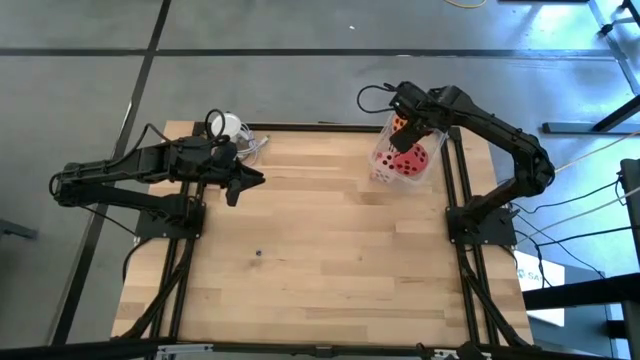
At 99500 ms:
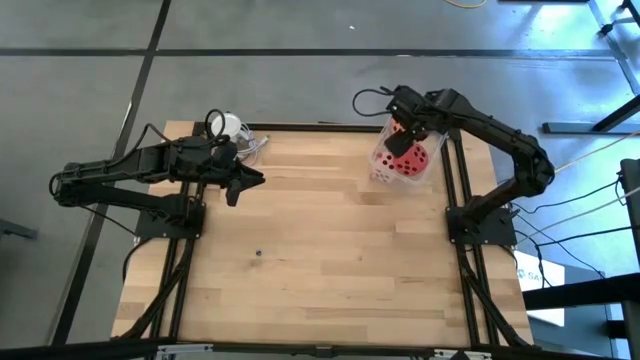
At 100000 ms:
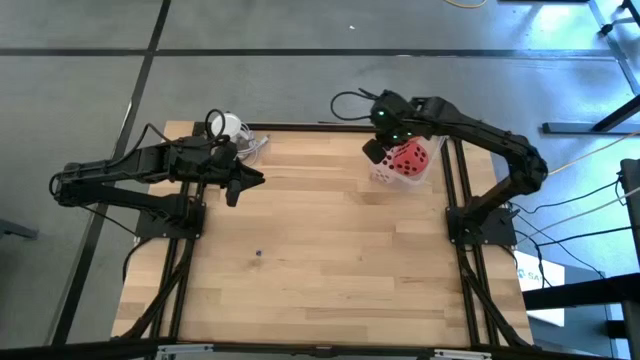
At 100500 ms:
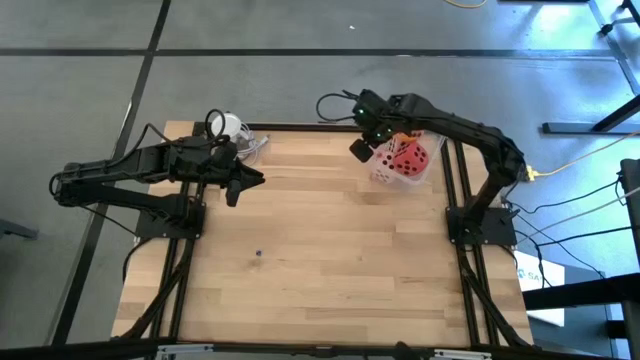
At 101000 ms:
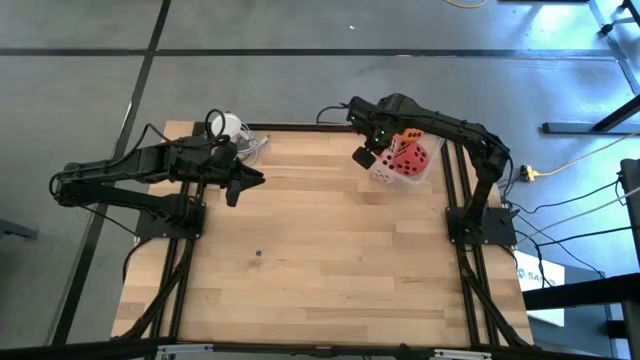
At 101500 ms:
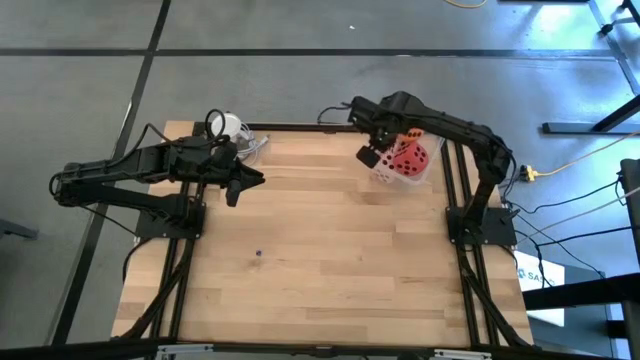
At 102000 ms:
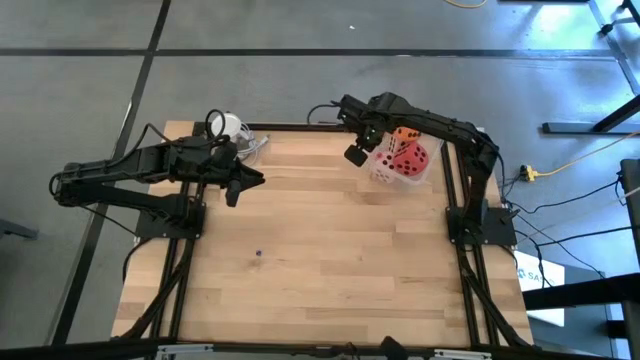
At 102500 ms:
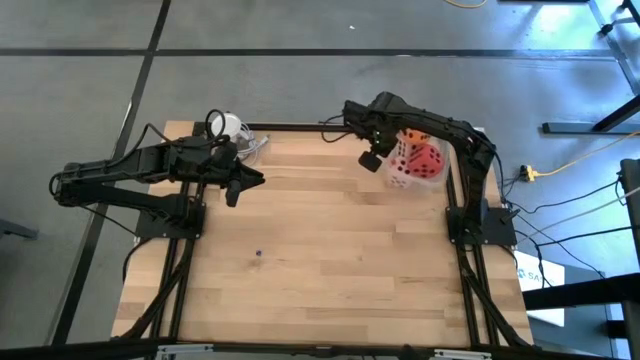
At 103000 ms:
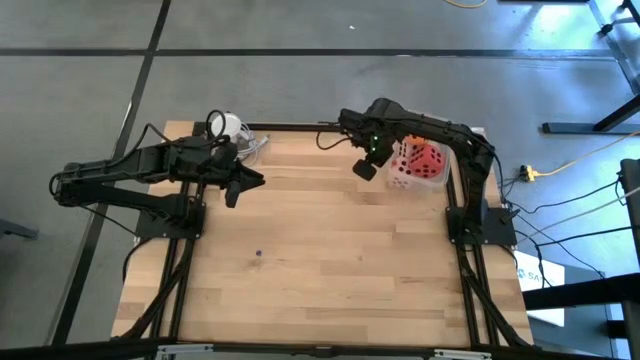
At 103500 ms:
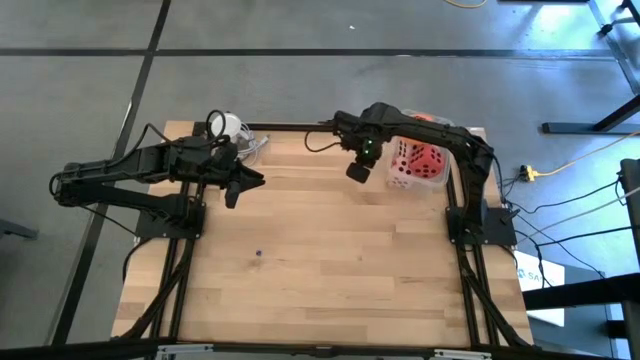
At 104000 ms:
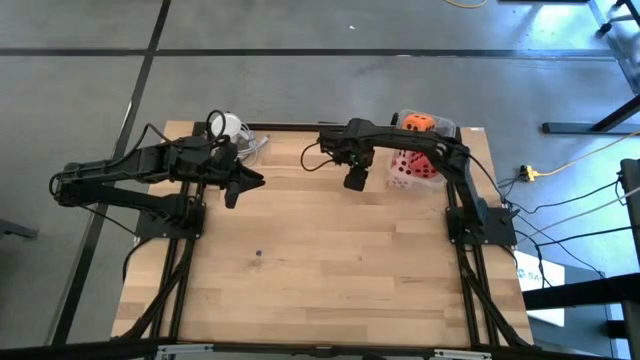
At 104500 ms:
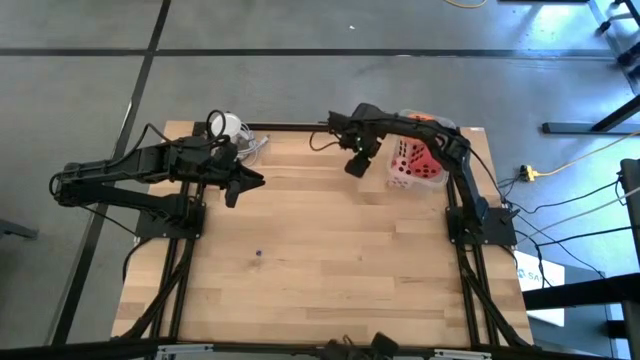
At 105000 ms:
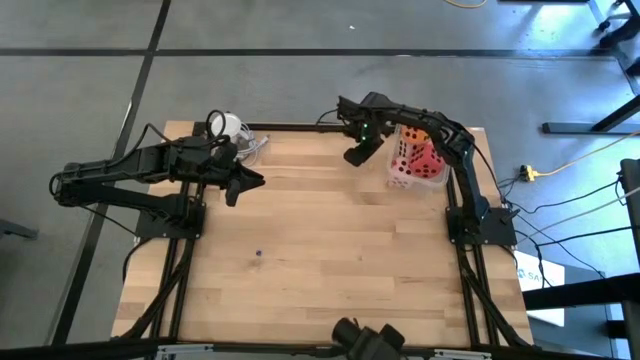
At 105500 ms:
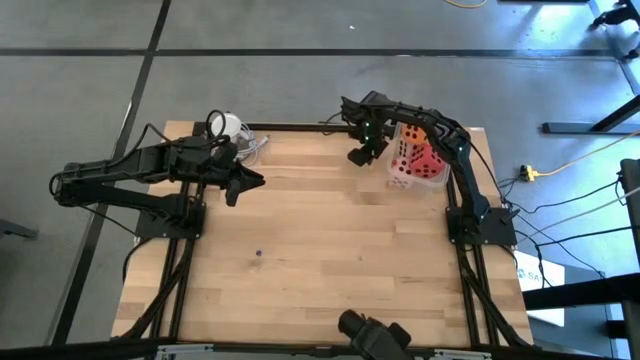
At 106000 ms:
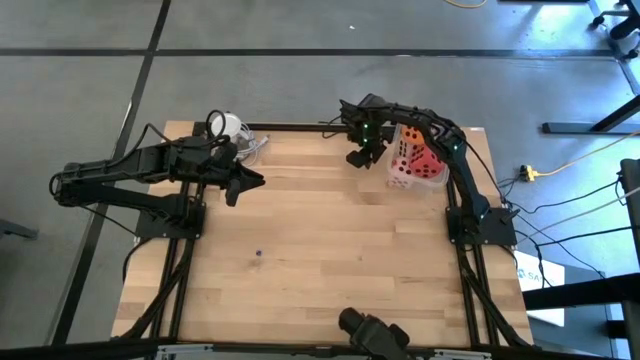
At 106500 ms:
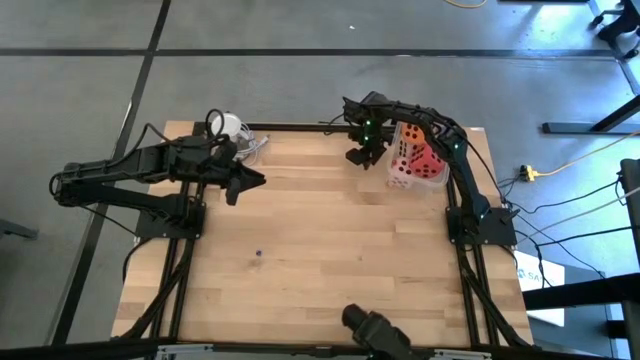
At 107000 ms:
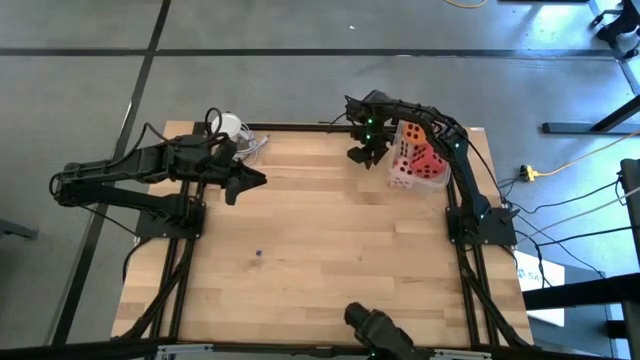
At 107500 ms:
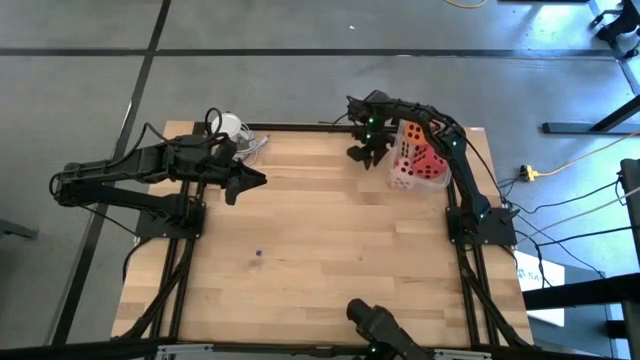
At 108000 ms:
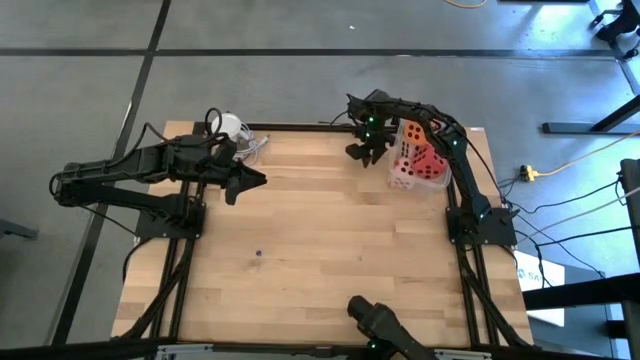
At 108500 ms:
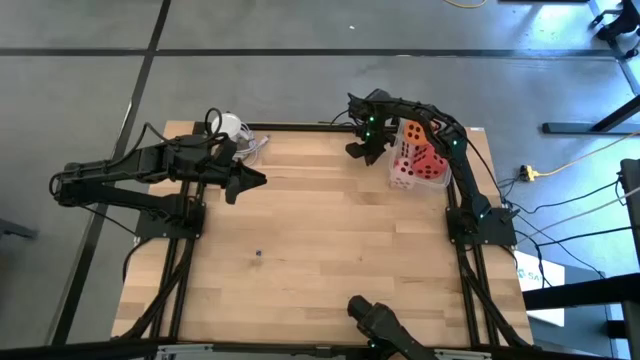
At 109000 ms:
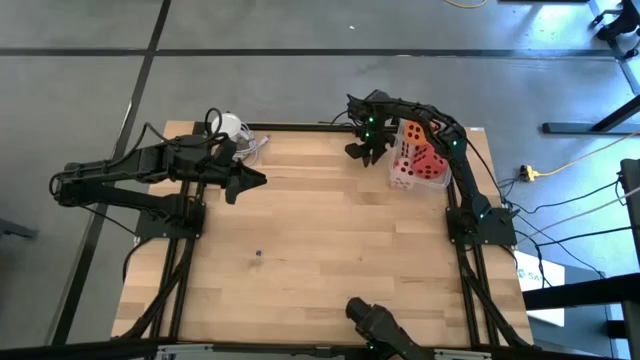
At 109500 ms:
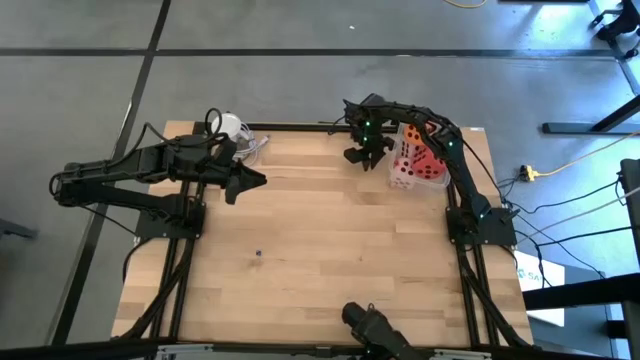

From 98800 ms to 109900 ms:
Task: Pick & Place Dice
Put the small yellow die into the container

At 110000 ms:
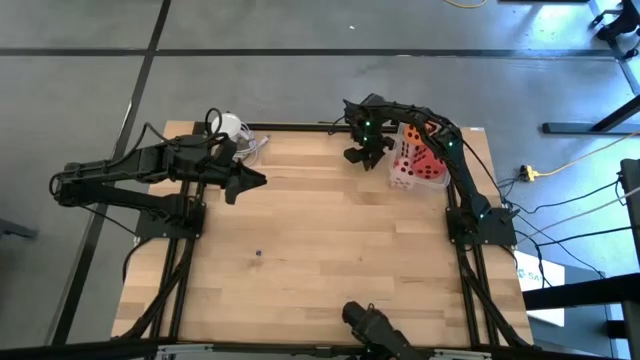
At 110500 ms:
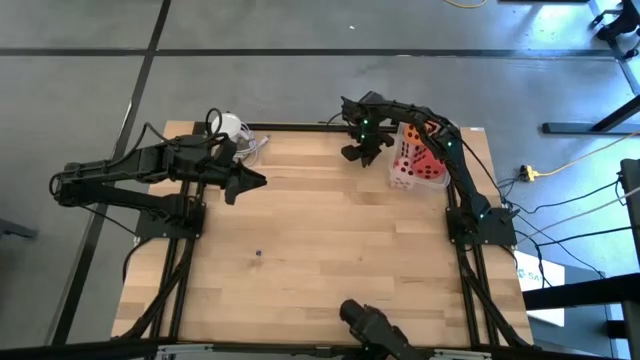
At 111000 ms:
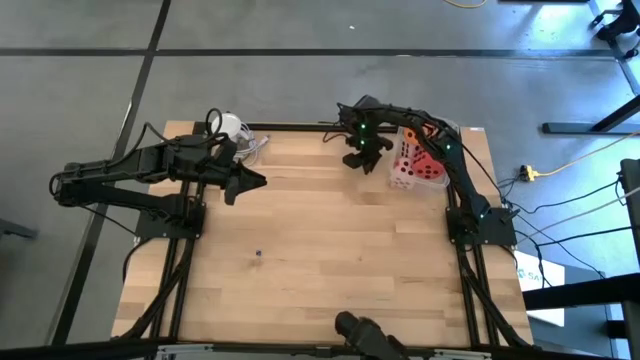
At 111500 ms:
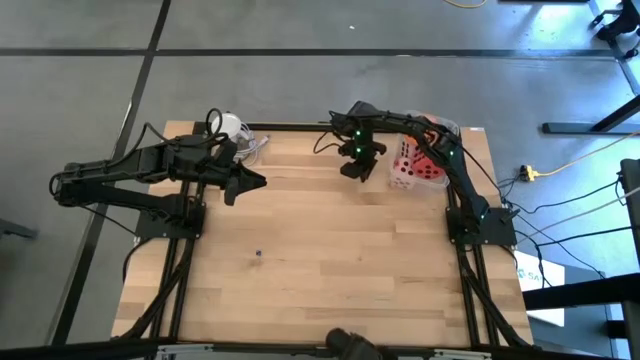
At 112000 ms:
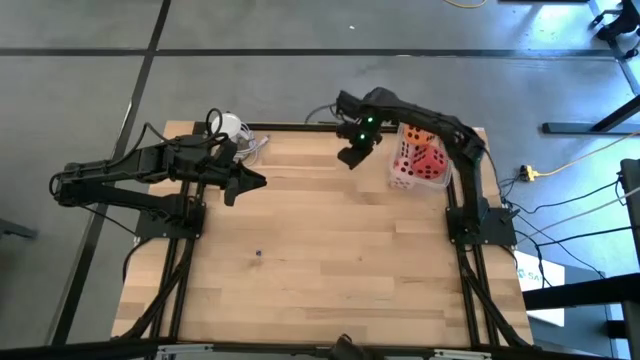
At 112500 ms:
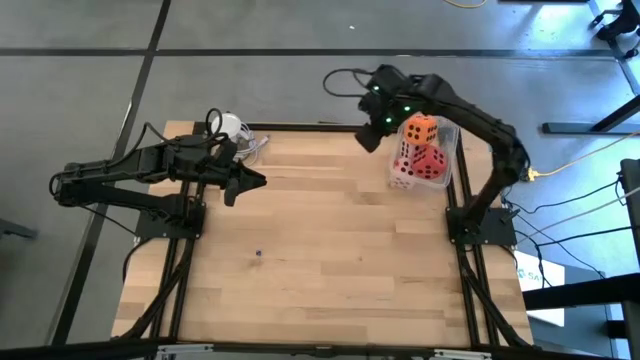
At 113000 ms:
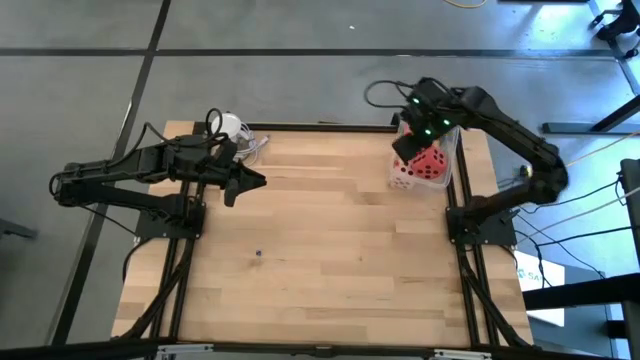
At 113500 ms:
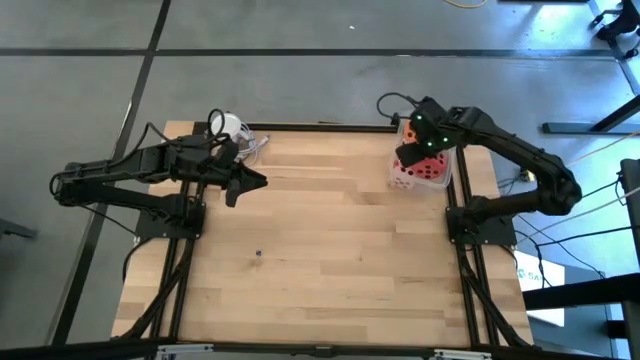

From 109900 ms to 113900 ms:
Put the small yellow die into the container
